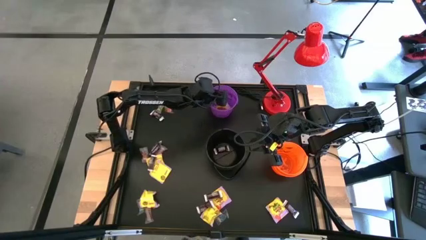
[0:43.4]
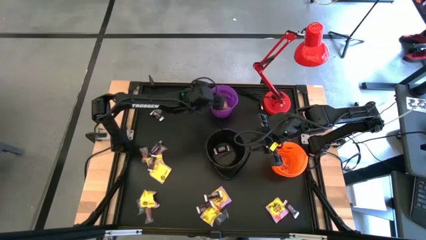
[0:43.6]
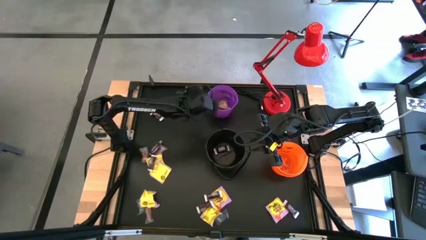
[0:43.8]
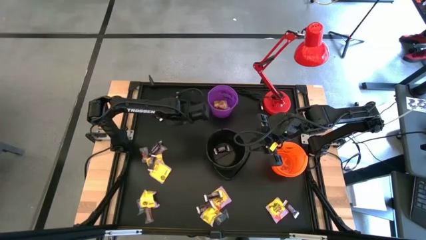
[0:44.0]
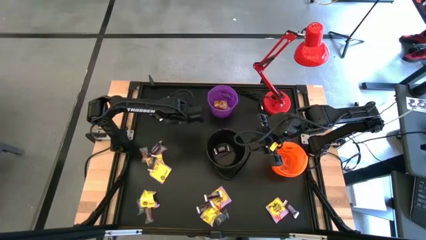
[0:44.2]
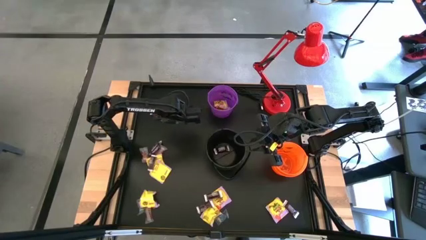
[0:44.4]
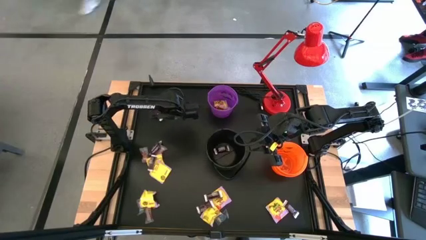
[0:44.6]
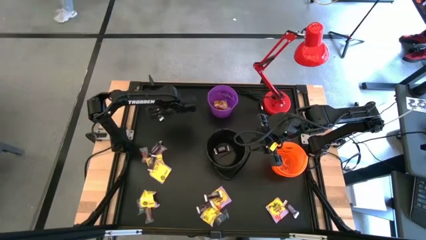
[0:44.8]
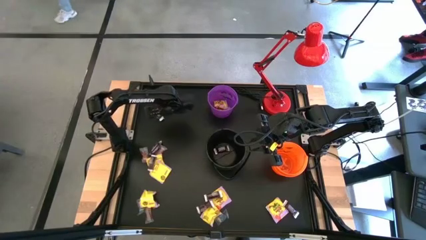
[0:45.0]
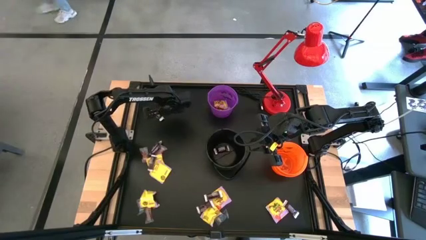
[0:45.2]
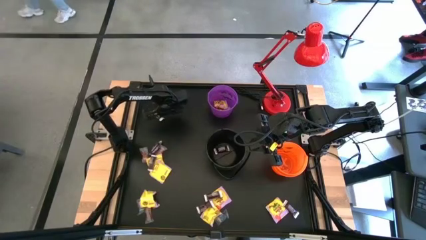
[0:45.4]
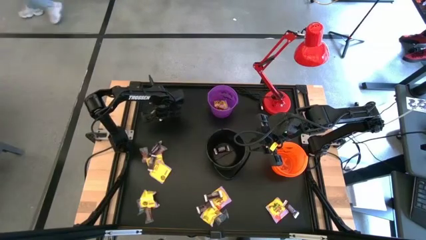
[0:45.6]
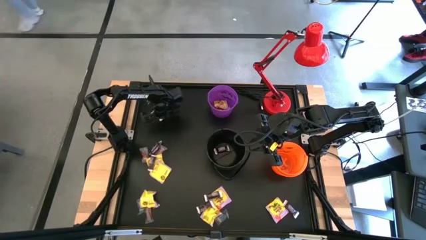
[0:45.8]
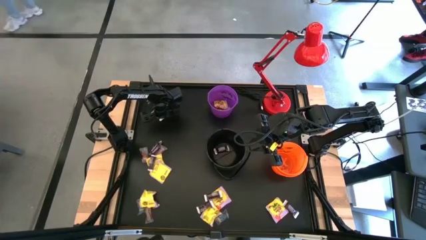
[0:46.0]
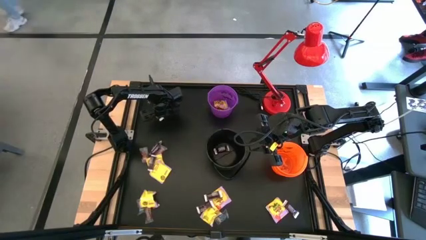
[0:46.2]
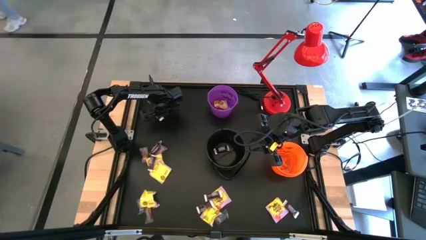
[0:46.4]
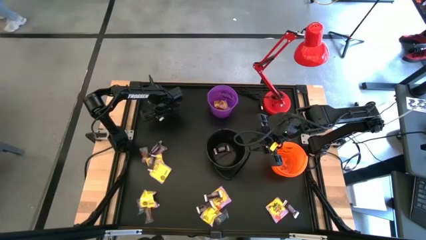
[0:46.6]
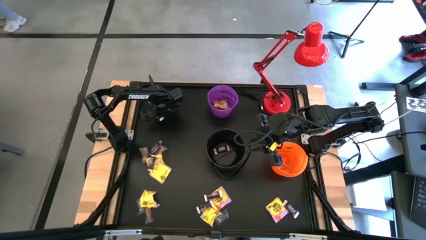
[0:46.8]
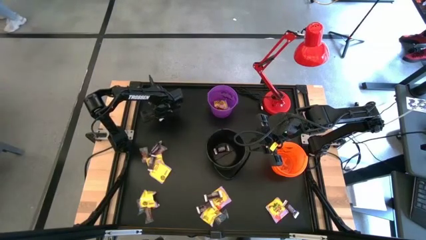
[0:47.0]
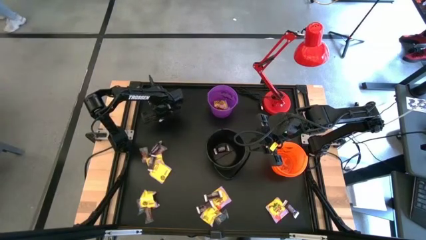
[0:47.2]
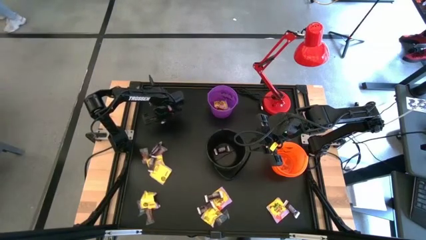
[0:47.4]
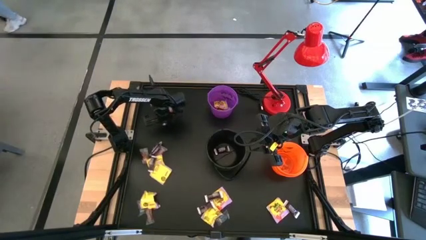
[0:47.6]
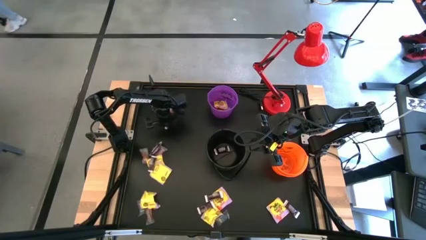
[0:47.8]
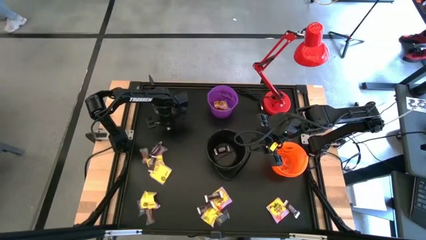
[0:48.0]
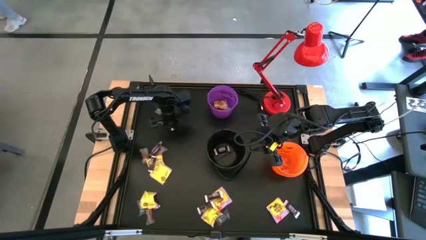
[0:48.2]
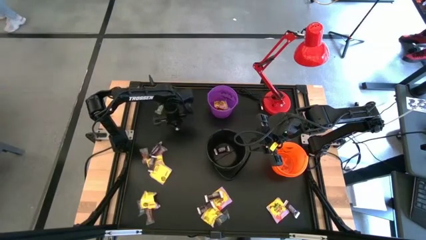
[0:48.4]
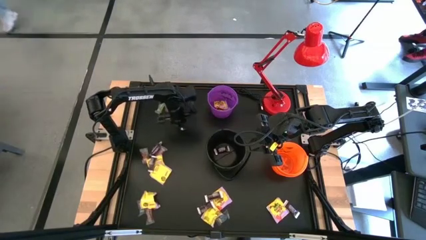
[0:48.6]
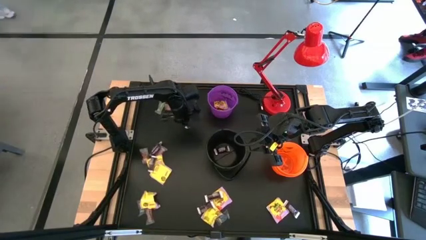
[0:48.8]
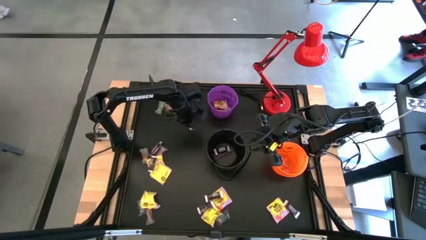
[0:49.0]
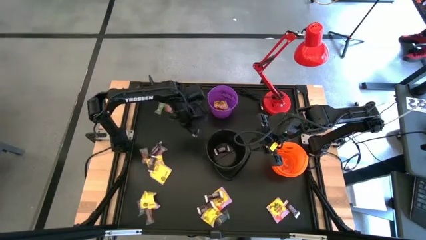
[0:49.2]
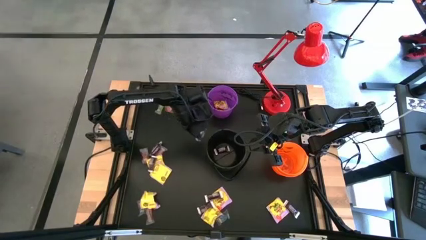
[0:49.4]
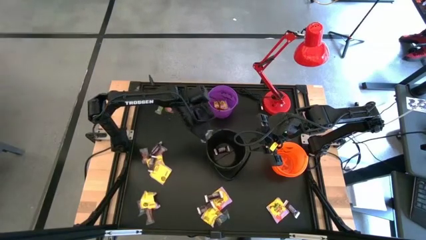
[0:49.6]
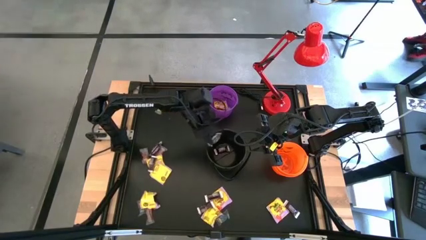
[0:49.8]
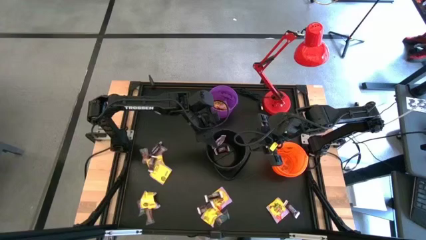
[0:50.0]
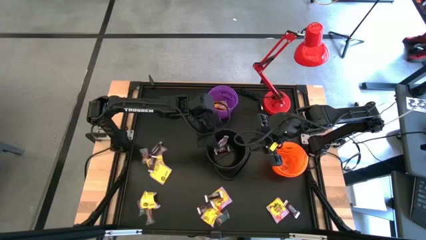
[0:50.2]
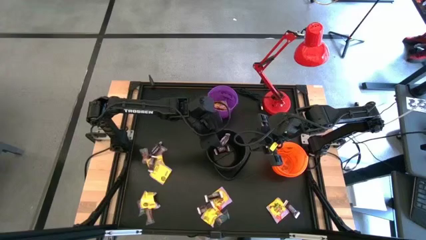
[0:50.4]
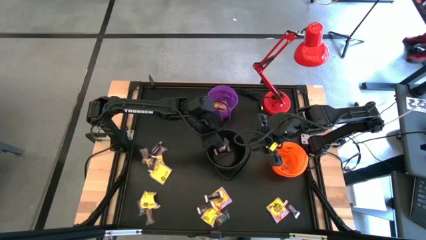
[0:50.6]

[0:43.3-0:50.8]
Task: Sort candy
Put the brown chocolate into the black bucket

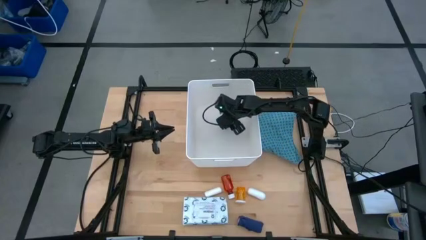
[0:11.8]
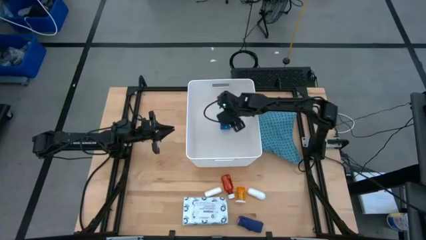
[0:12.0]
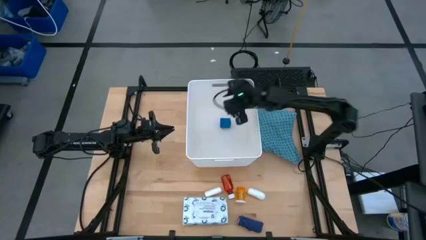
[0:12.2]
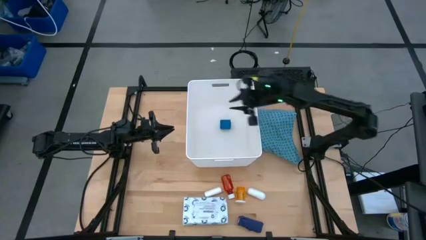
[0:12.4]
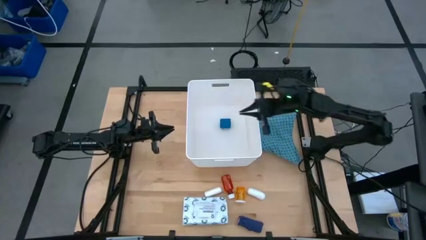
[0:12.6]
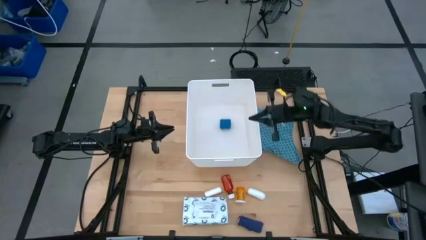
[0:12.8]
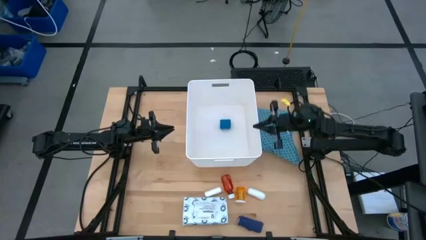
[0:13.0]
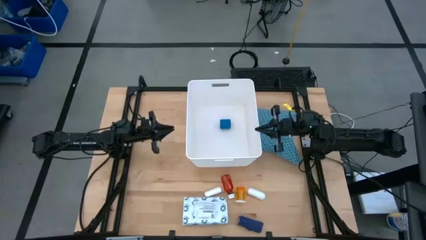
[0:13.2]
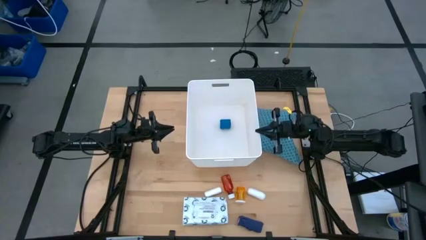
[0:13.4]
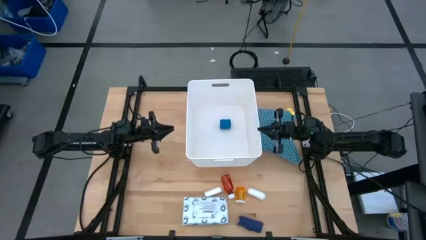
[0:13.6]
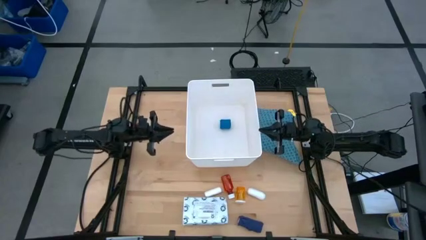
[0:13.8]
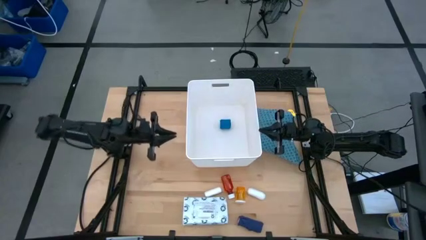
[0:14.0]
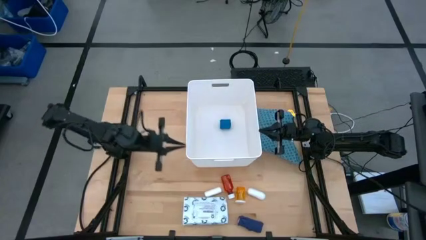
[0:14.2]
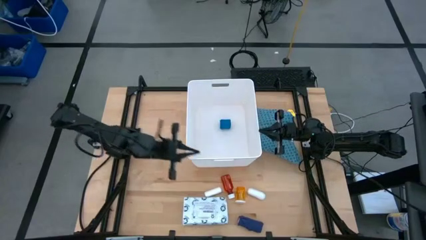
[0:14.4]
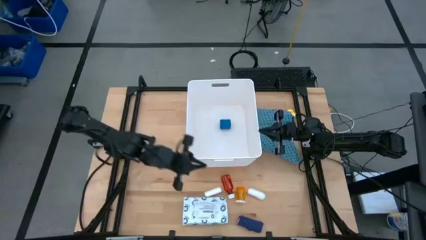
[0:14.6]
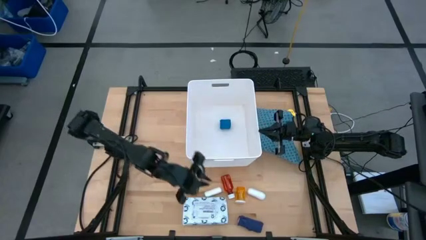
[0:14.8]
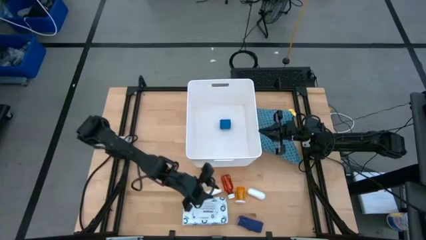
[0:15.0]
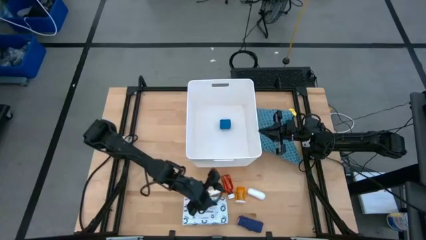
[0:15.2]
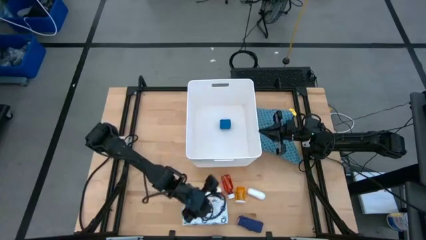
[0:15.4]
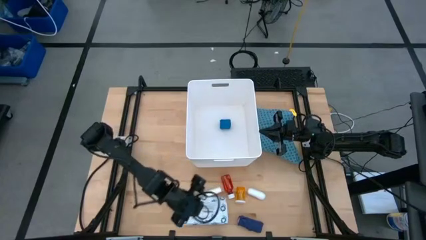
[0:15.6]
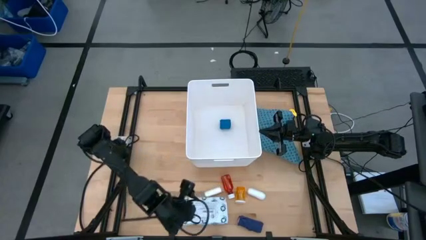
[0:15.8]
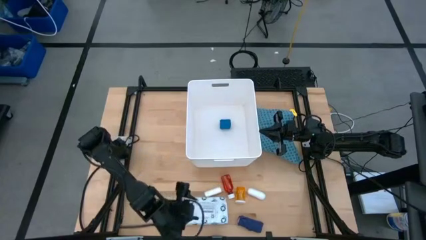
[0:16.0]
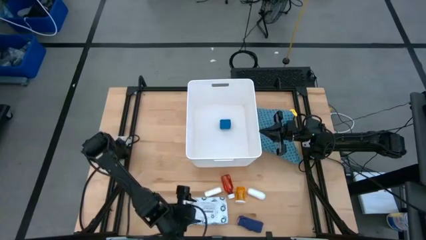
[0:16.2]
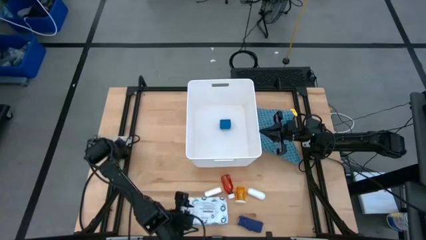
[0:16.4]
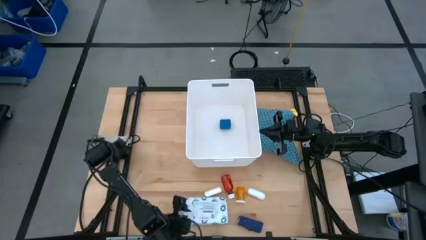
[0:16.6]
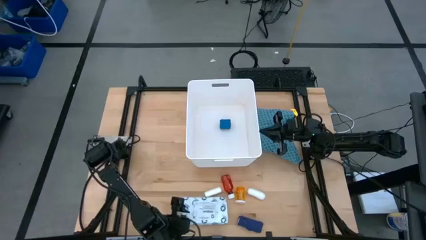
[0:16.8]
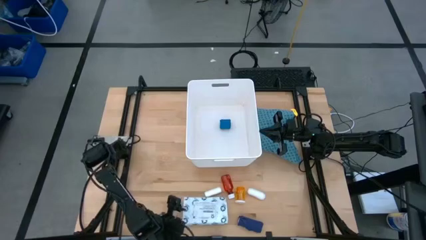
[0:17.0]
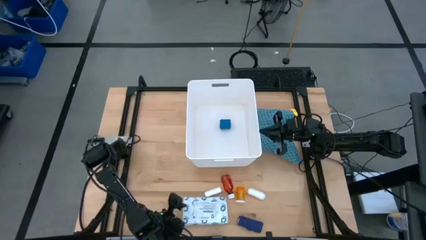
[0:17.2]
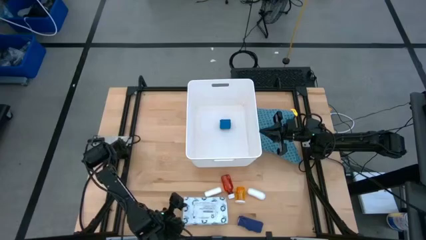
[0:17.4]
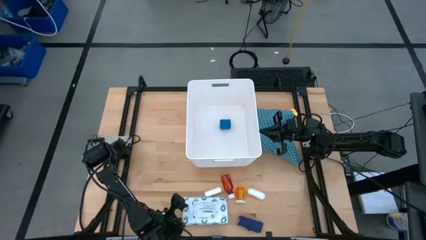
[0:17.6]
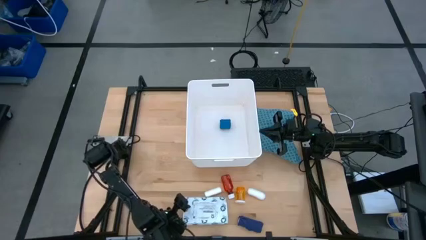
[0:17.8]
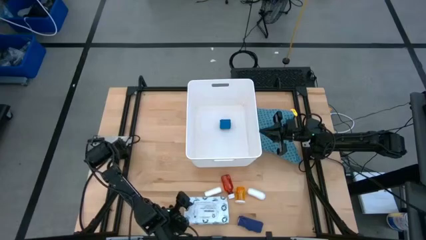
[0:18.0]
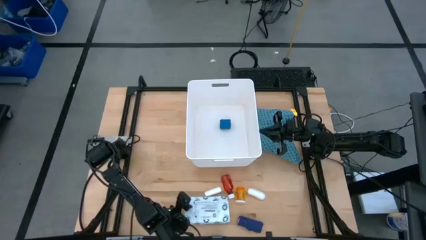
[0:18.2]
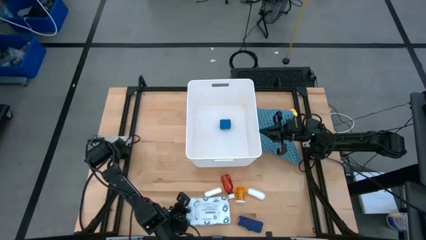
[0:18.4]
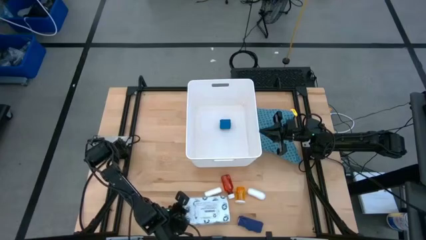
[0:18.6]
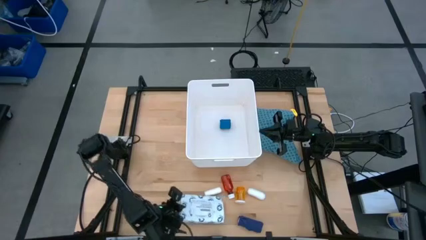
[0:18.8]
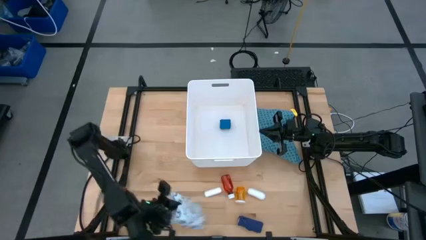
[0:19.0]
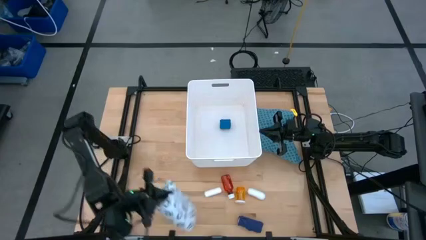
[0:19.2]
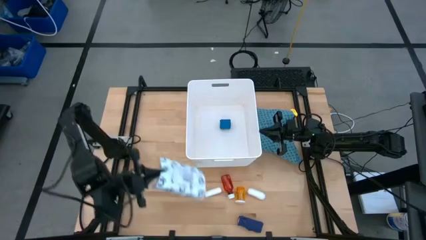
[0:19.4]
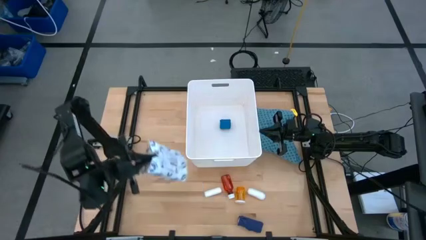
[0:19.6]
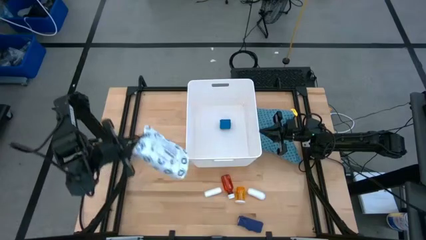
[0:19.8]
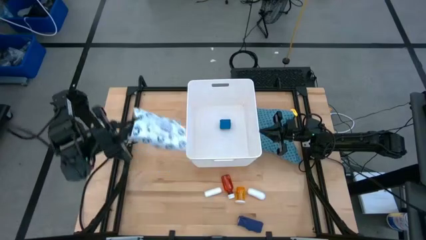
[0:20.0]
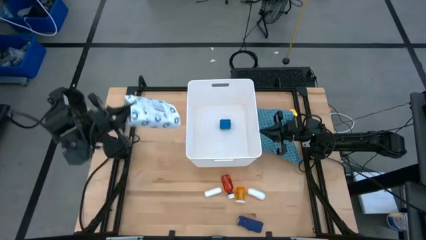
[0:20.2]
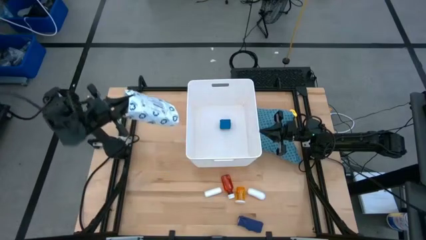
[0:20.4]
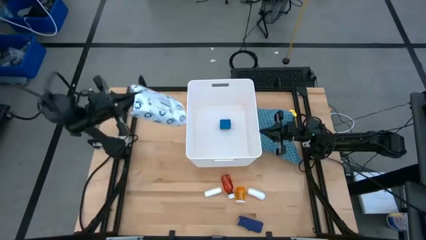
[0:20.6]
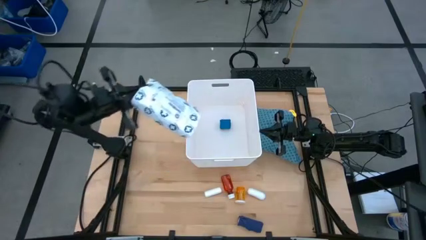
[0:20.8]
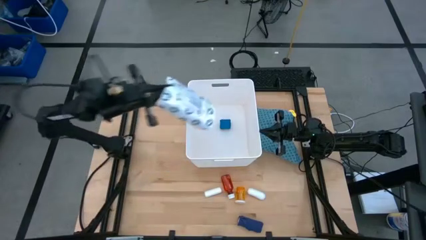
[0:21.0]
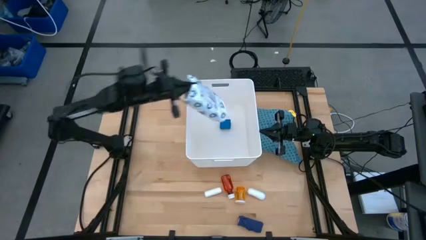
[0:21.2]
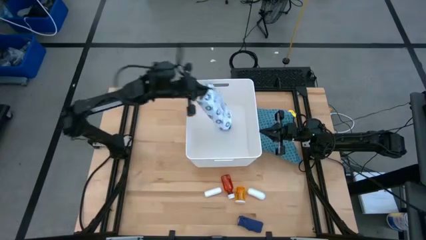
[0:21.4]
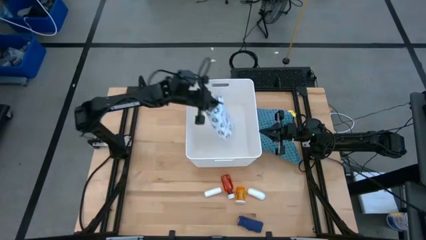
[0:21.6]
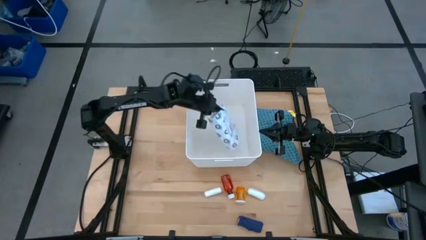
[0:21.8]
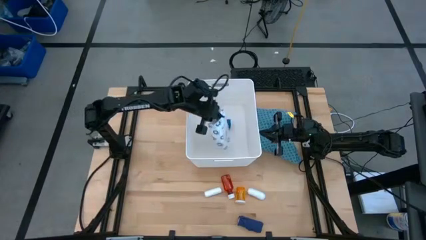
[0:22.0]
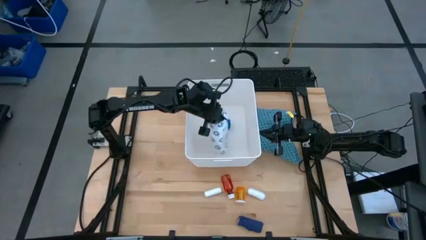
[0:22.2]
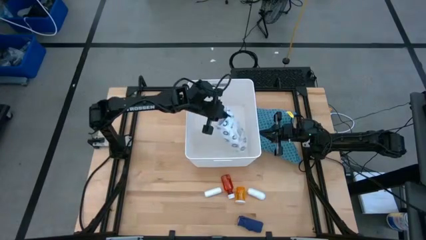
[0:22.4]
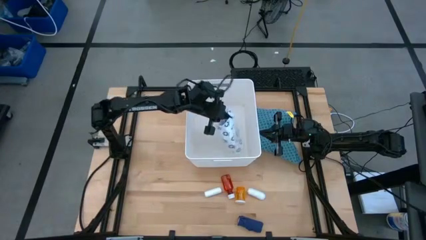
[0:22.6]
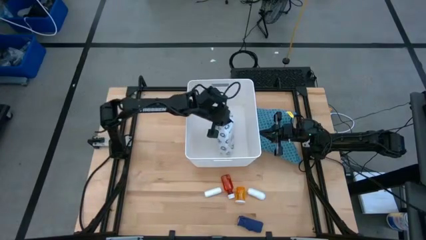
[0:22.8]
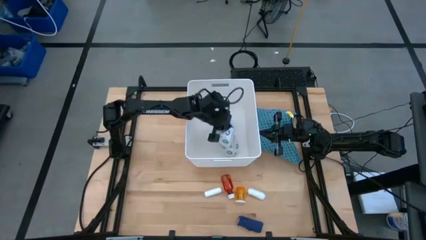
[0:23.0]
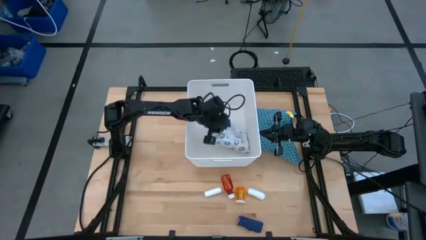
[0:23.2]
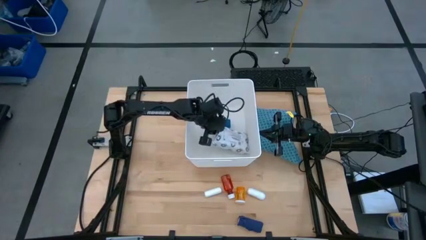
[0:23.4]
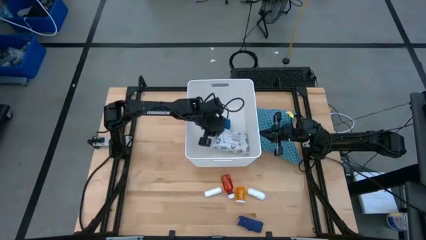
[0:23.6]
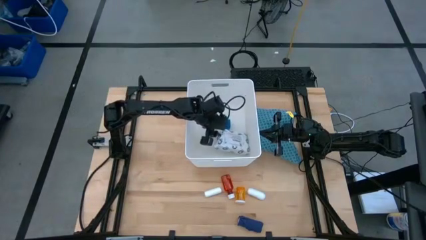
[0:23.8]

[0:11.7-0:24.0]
Task: Pick & place medical supplies in basket/bin
Put the mailer bag into the white bin
